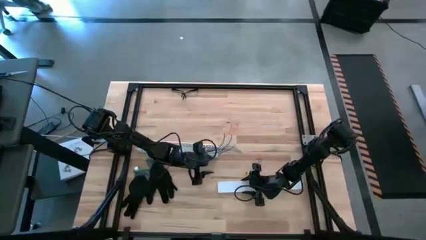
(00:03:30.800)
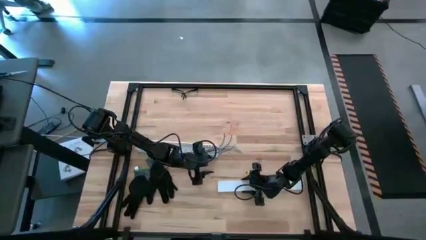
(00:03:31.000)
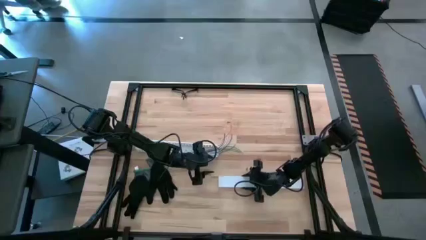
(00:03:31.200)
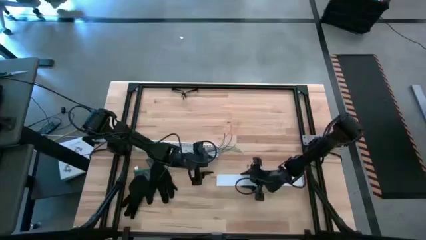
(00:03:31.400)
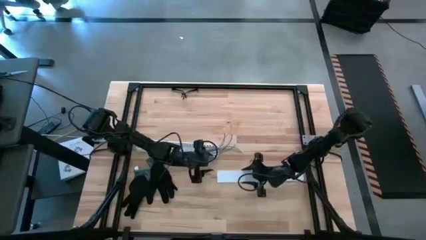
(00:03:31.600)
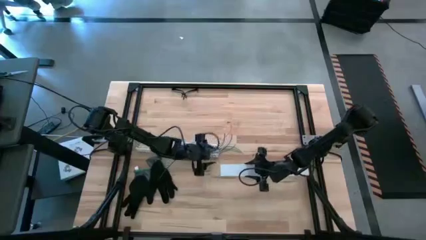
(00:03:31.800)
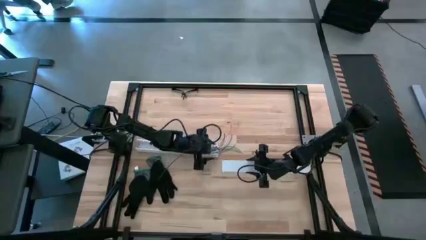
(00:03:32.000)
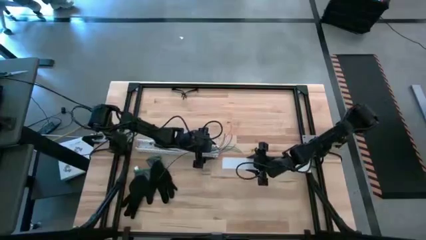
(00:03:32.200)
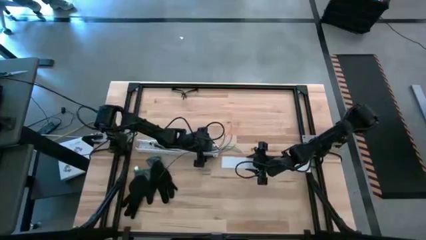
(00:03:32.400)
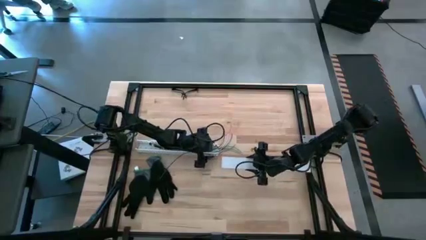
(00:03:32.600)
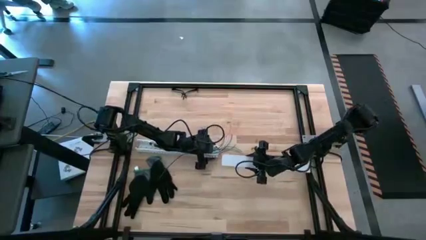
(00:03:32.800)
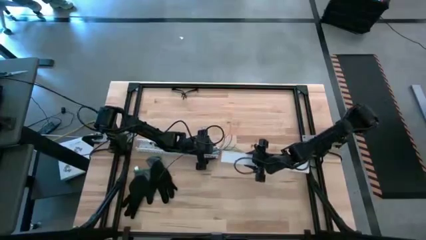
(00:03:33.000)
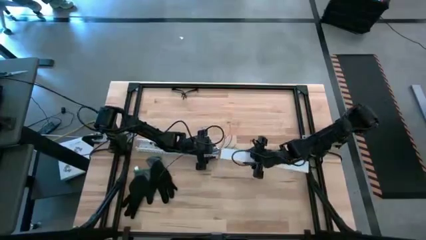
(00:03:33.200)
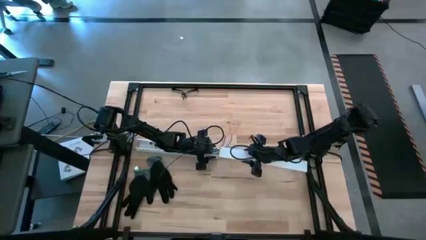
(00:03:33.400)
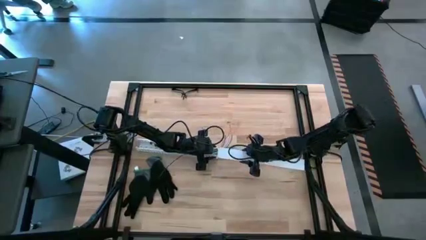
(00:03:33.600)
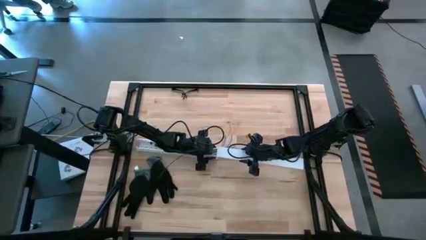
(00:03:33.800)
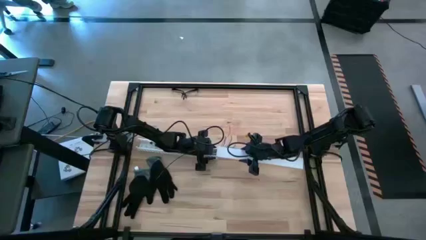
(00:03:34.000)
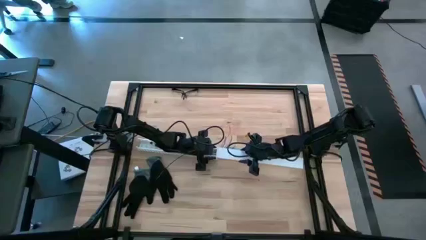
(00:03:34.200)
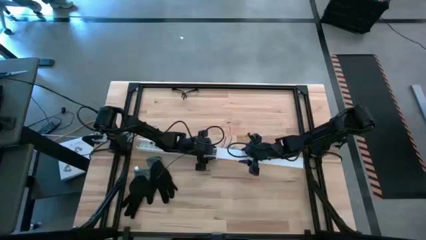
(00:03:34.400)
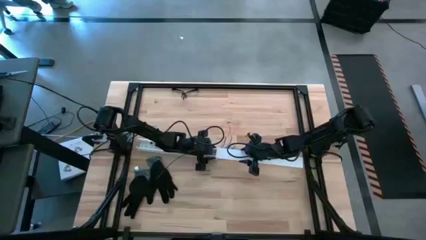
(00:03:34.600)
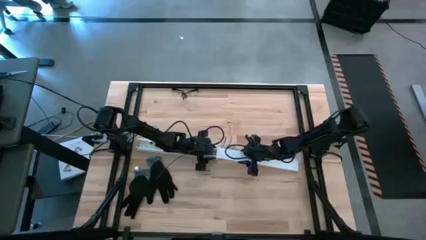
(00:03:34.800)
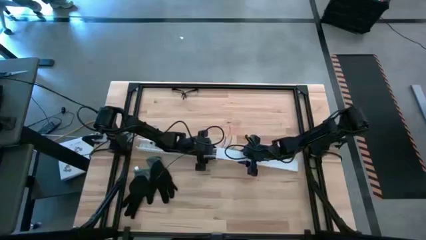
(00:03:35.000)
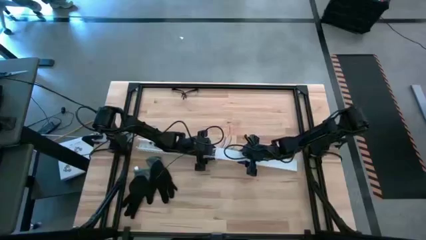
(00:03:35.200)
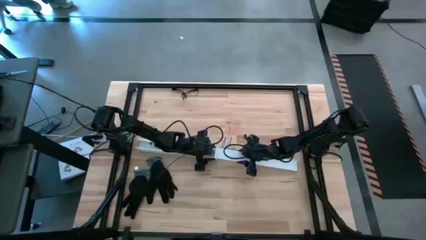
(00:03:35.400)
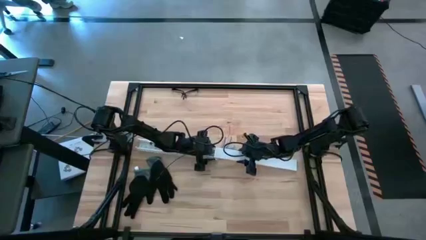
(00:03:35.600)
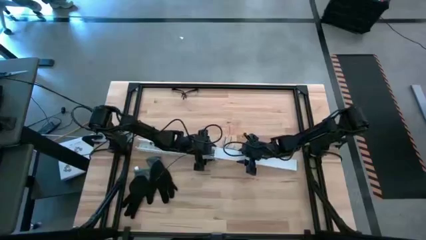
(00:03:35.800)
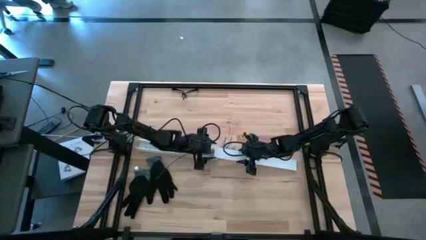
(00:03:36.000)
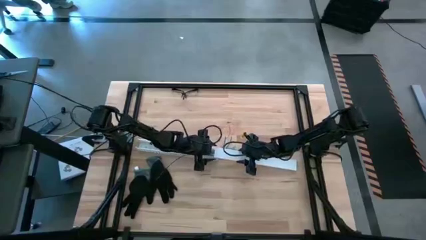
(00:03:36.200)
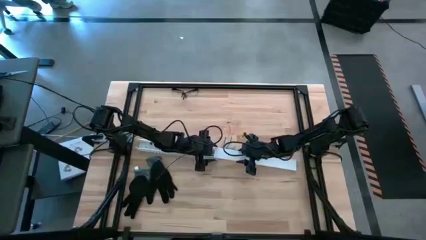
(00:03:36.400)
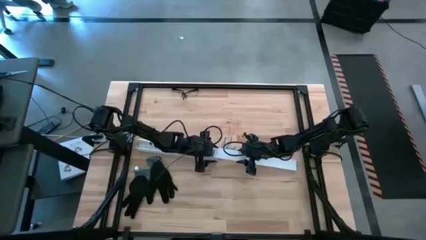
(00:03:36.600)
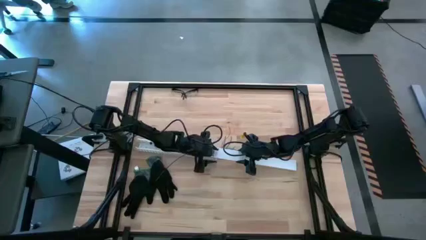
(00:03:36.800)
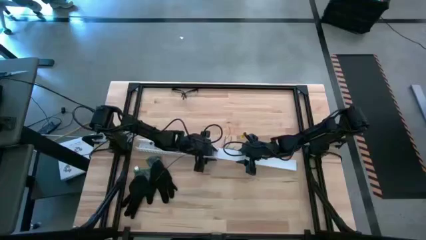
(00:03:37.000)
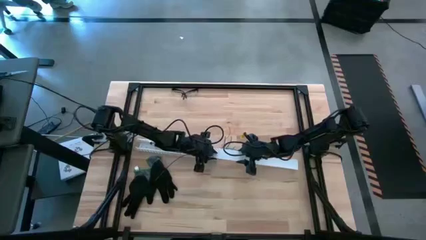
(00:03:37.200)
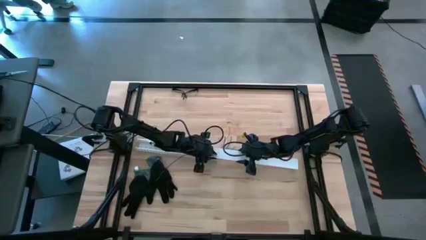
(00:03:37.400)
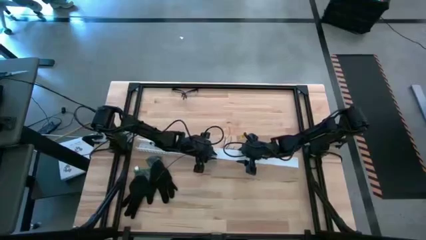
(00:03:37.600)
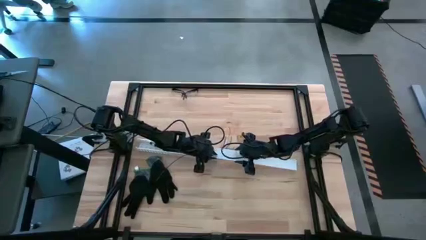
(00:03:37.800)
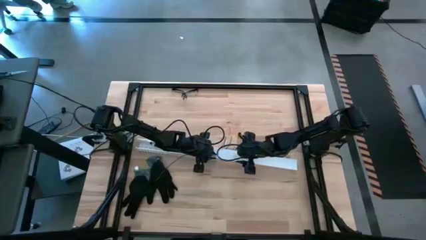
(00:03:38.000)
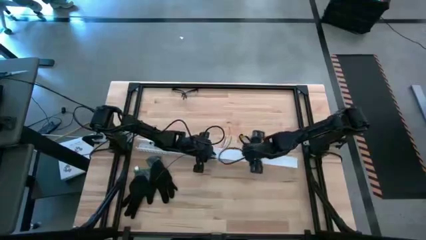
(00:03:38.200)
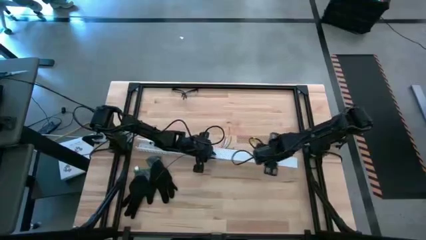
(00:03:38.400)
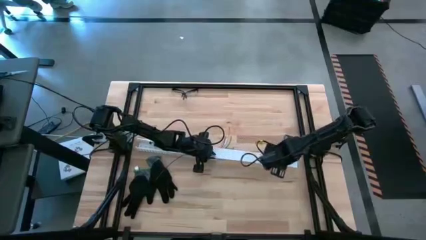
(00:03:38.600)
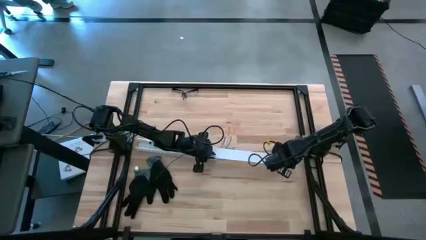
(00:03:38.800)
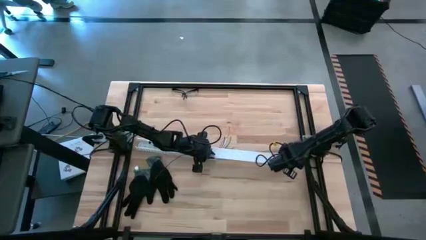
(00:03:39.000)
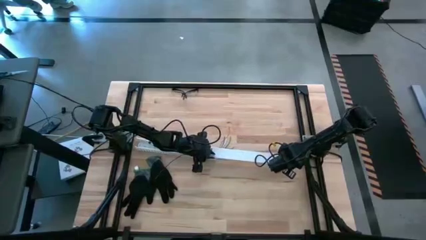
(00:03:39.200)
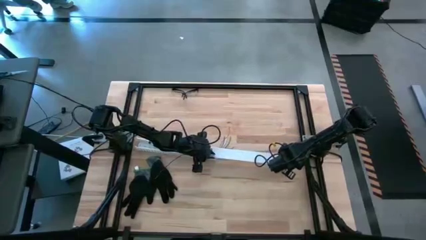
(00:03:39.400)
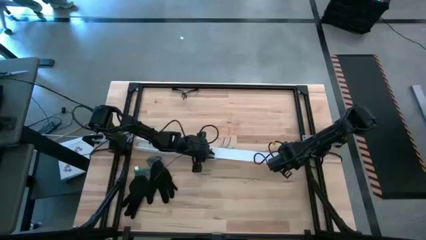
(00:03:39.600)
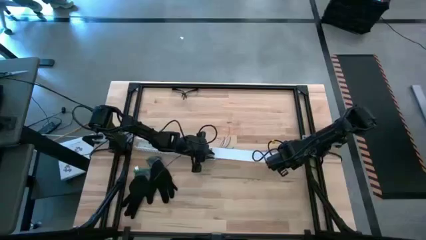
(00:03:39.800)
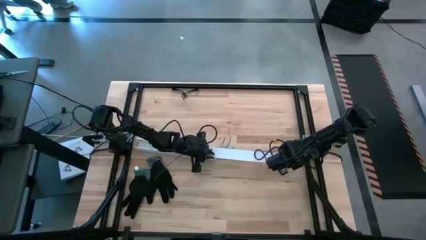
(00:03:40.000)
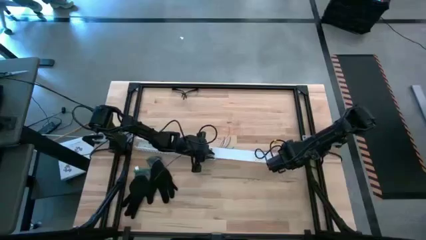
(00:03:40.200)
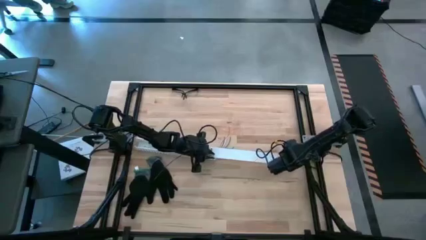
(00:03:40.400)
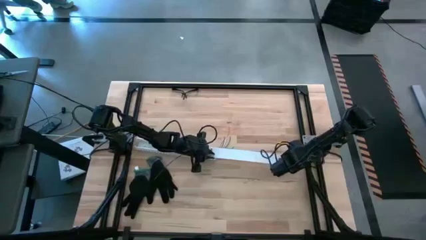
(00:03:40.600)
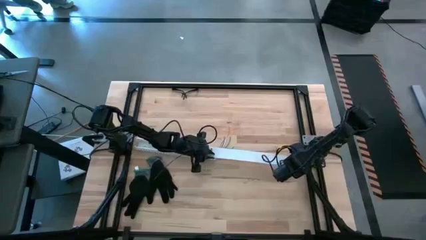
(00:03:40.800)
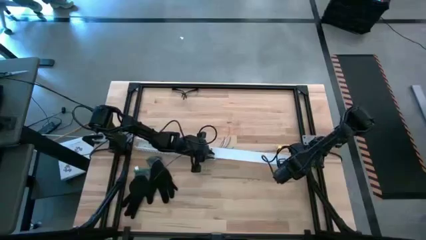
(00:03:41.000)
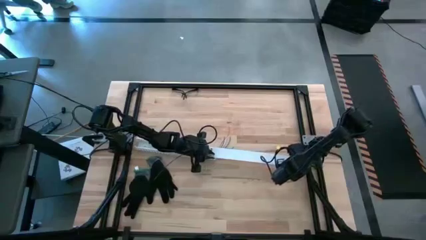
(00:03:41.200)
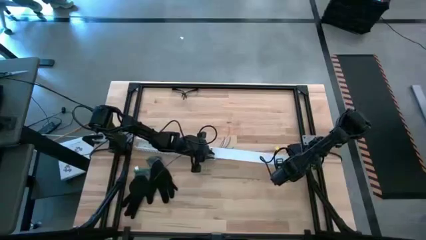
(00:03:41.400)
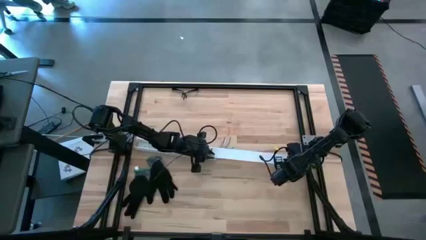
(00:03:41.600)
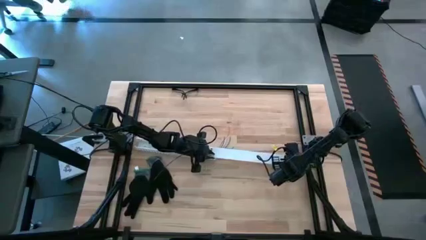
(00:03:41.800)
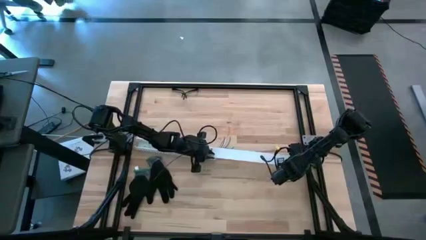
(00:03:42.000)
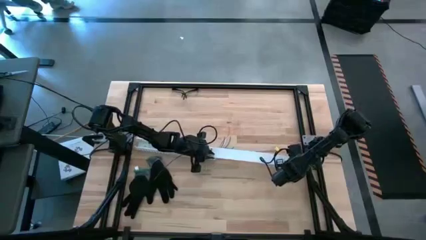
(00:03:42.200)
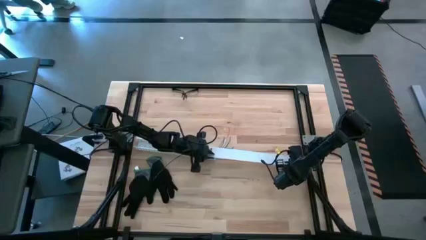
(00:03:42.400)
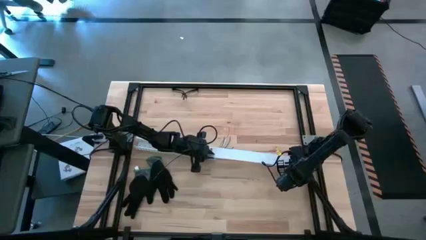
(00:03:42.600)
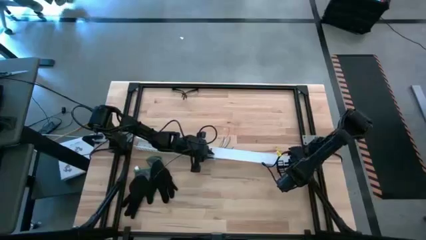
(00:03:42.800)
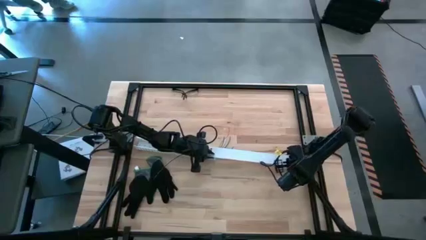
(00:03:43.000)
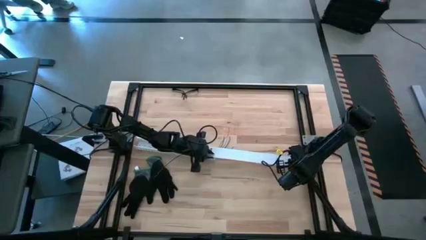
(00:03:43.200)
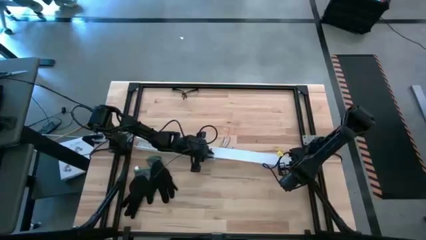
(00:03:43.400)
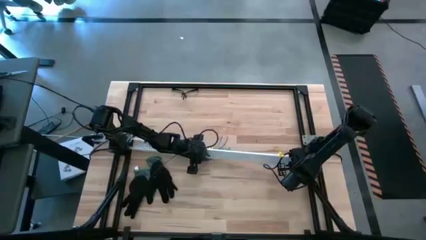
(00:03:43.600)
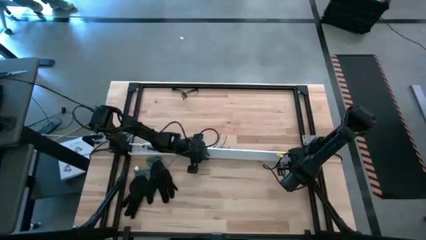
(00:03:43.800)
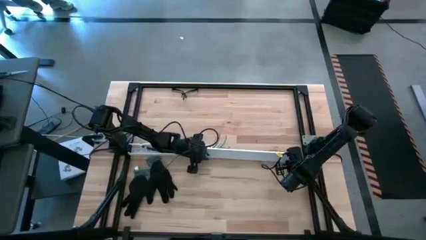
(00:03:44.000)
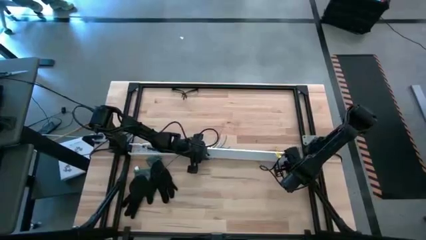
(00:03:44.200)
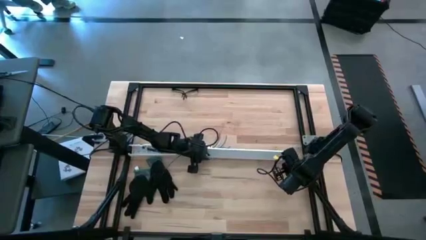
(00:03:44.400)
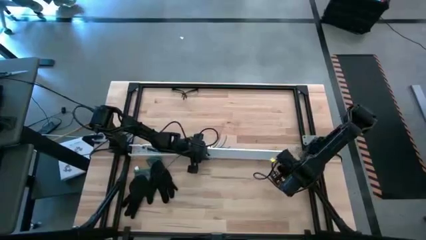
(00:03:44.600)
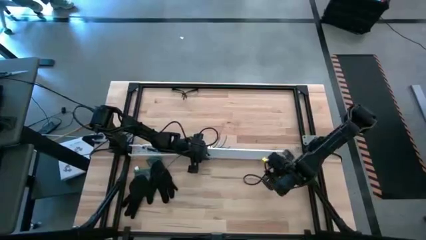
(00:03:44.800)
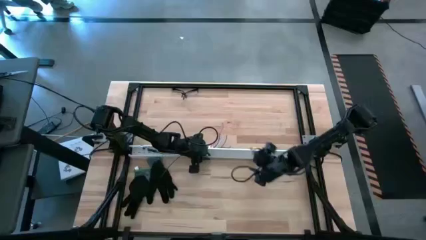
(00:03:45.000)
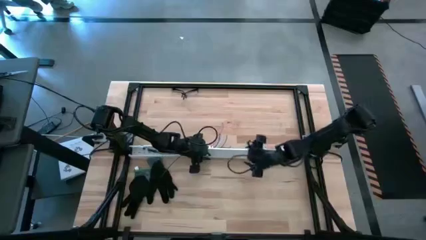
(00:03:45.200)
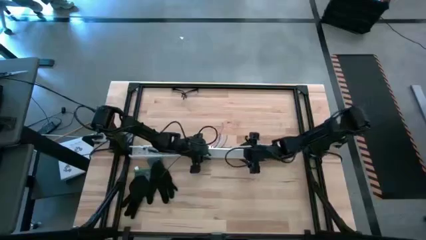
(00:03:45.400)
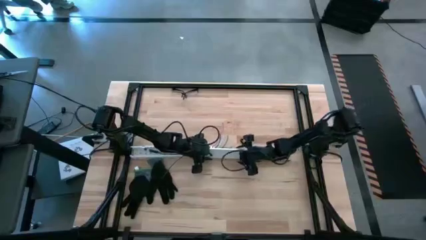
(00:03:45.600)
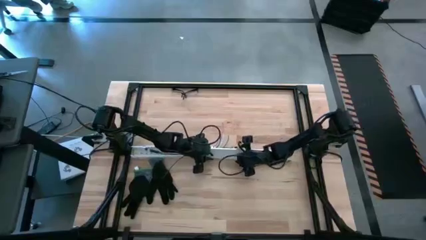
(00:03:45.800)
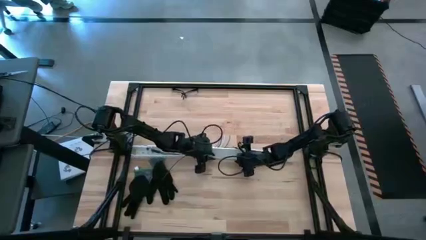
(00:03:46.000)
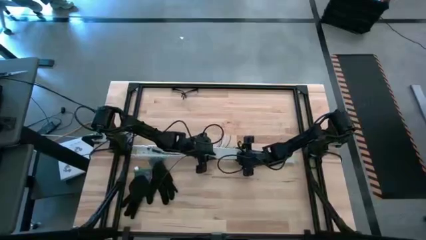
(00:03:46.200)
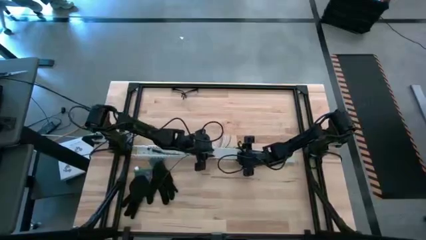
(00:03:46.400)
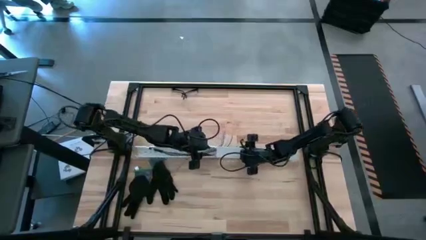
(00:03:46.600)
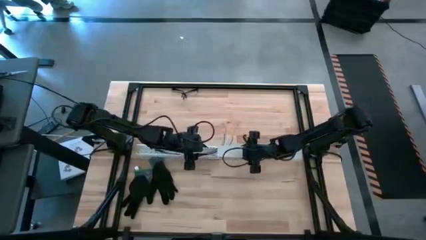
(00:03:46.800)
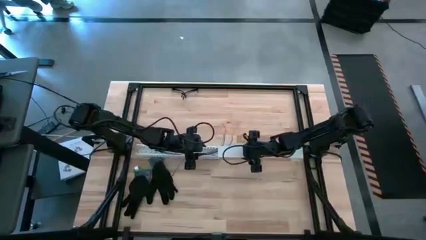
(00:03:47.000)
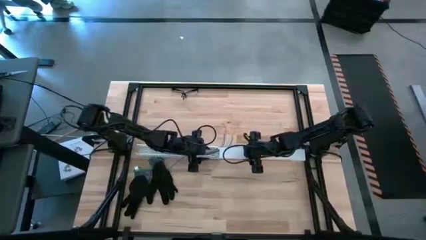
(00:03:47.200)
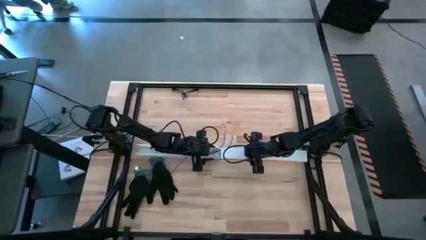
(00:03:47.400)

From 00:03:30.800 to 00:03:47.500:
Task: Ziptie cables
Close the white cable duct
